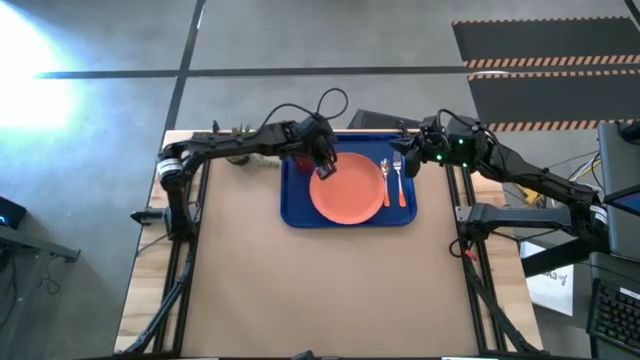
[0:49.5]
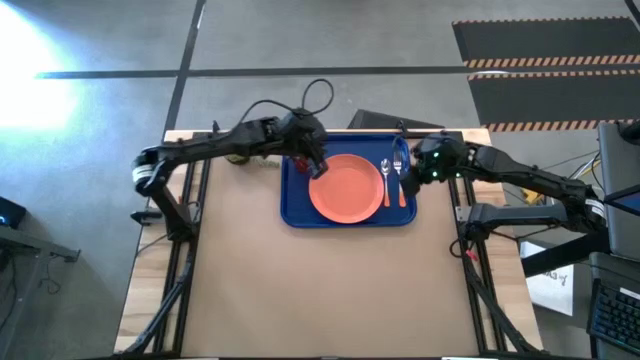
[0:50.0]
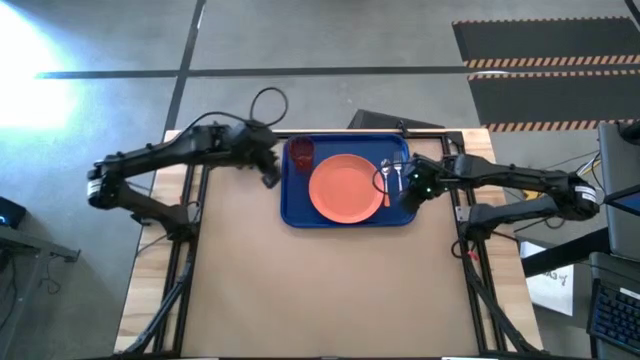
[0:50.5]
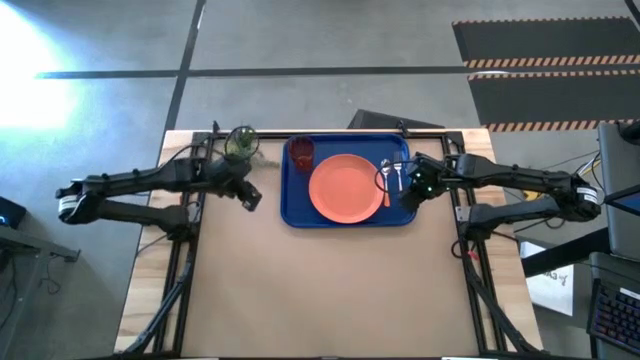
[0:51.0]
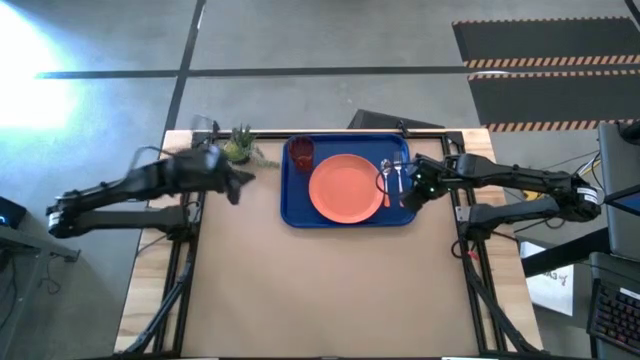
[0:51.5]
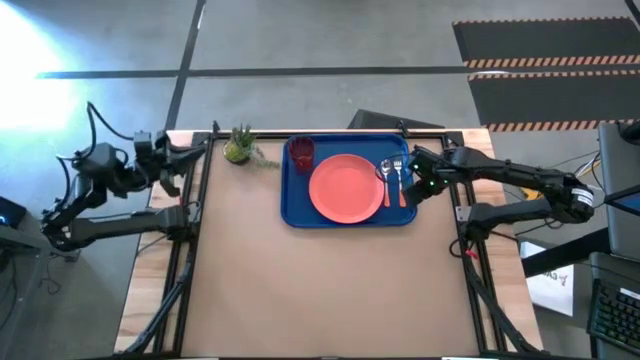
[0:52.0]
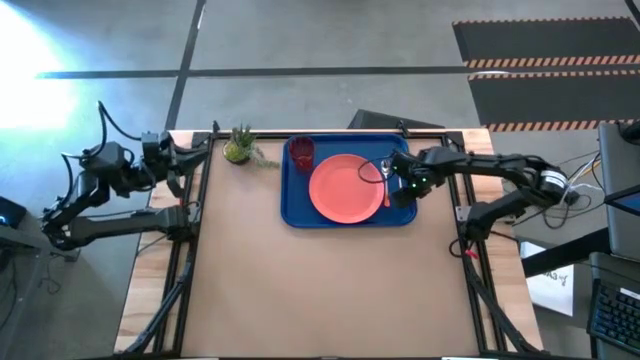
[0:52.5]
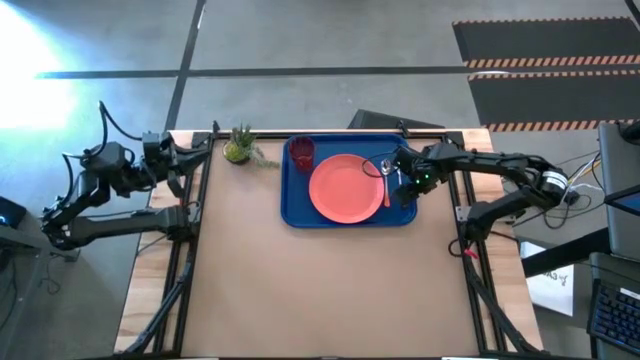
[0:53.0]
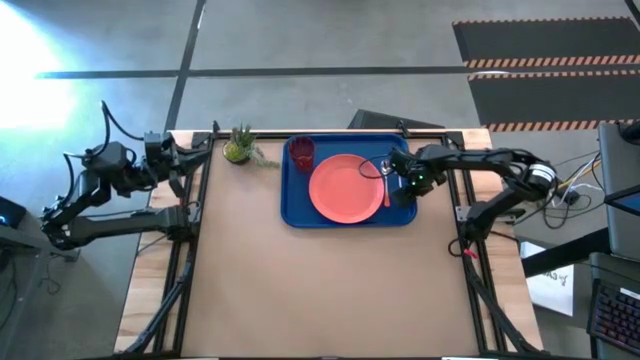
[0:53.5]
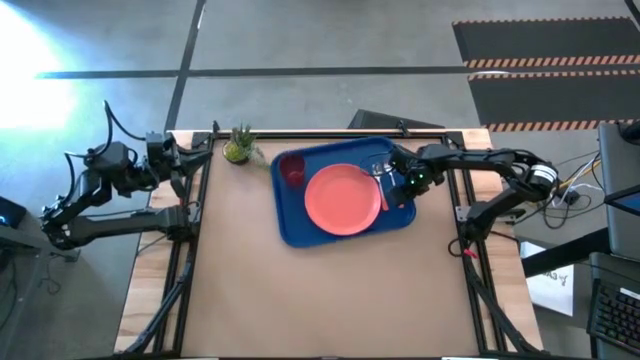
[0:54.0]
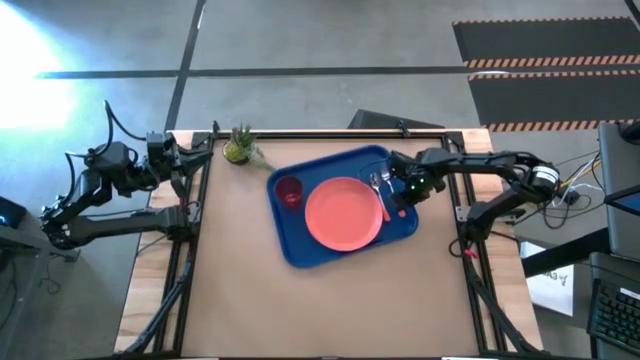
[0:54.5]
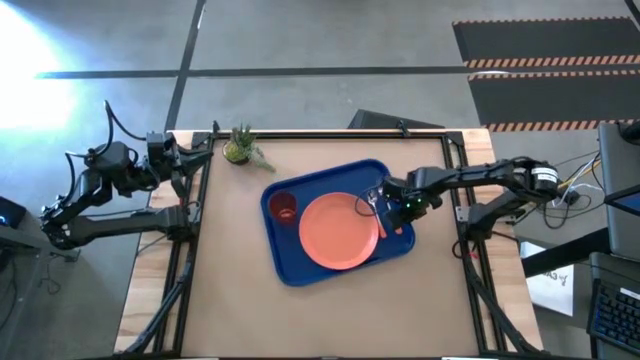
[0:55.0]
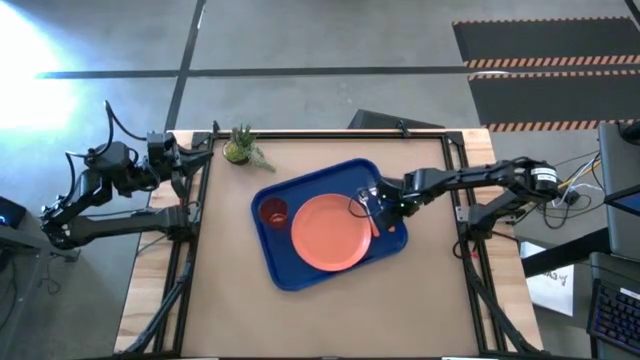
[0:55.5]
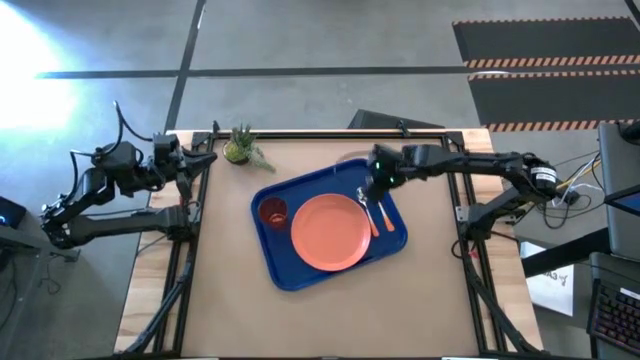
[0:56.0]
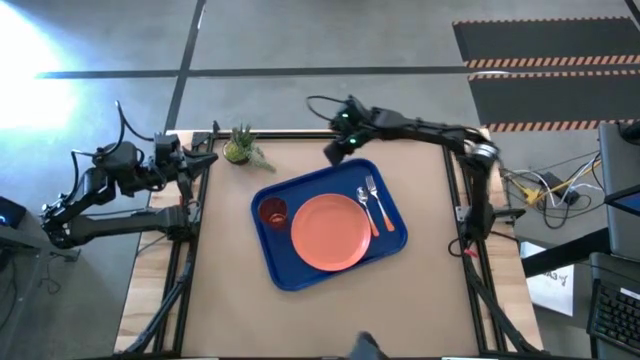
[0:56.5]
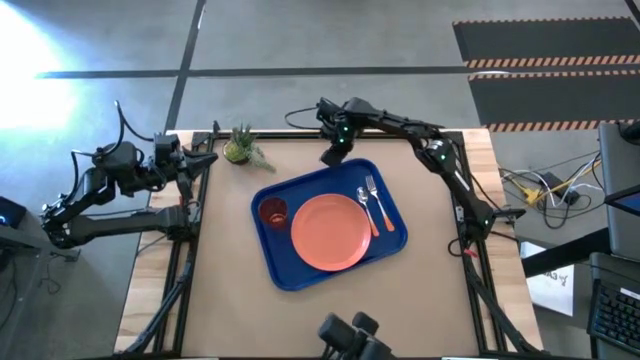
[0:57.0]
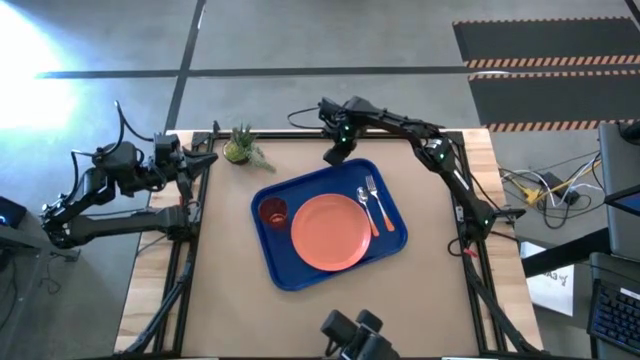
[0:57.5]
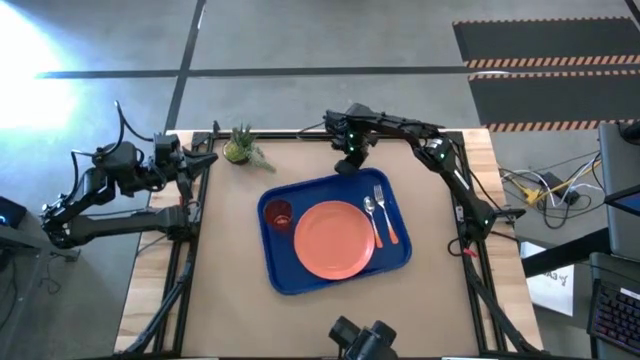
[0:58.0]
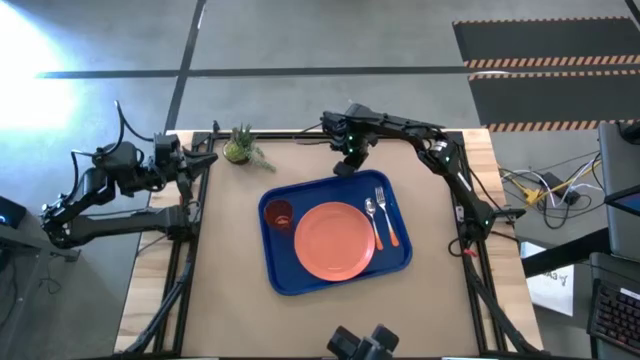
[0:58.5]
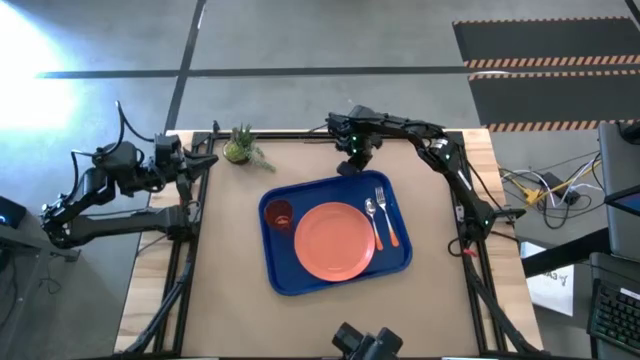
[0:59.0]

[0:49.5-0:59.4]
Task: Pick and place plate/cup/fork/spoon on tray
Move the set serving tray on the center of the table

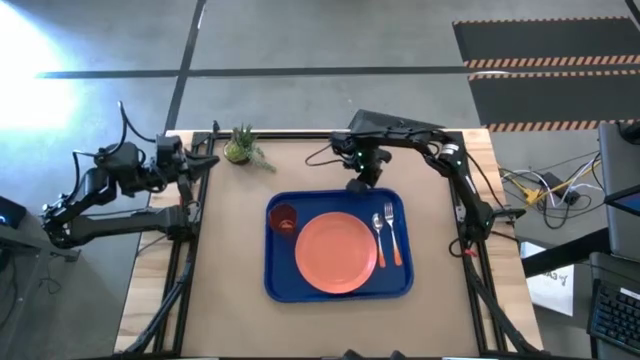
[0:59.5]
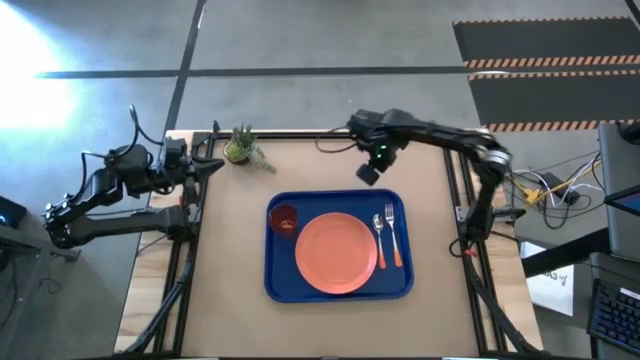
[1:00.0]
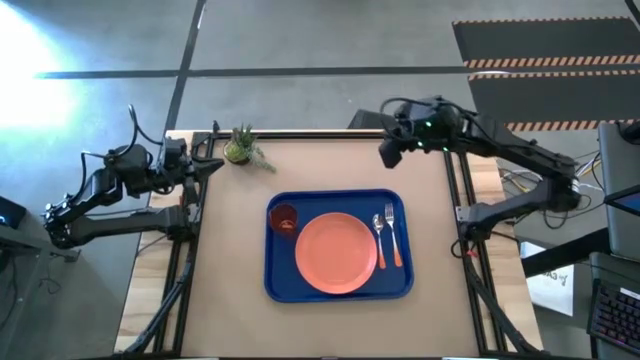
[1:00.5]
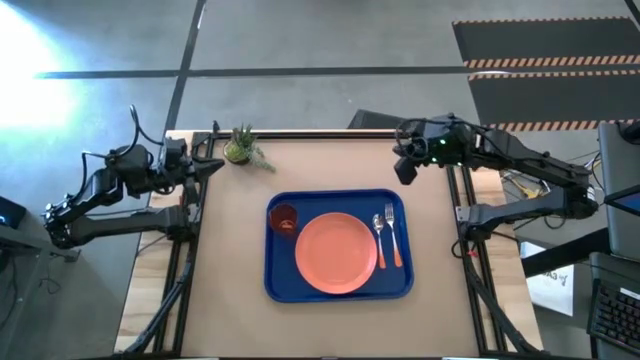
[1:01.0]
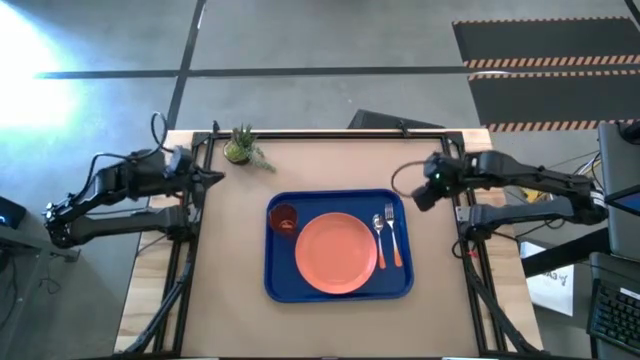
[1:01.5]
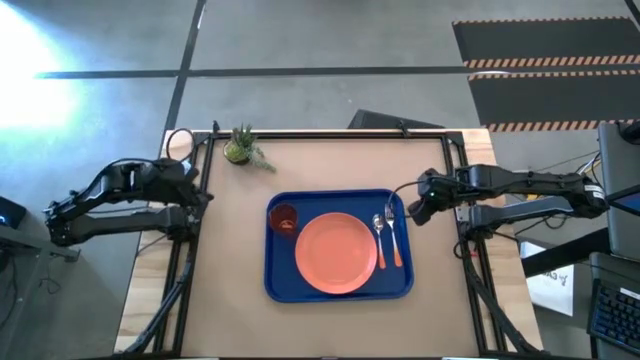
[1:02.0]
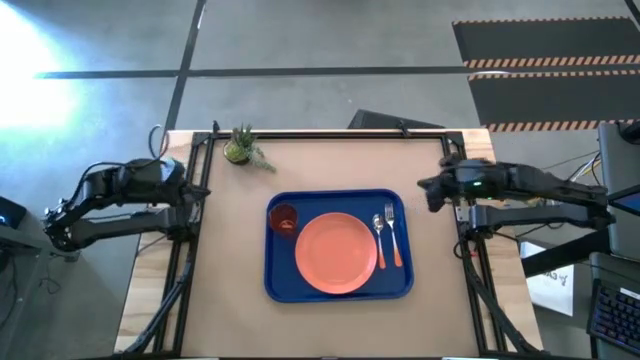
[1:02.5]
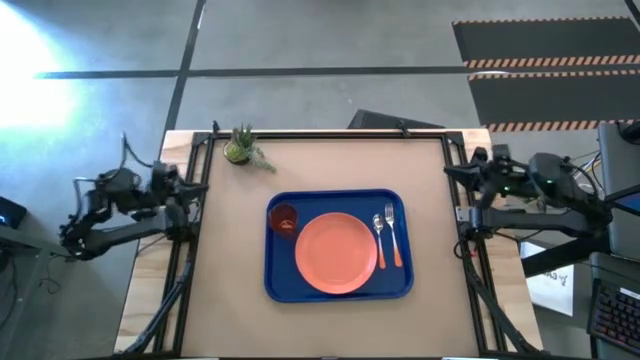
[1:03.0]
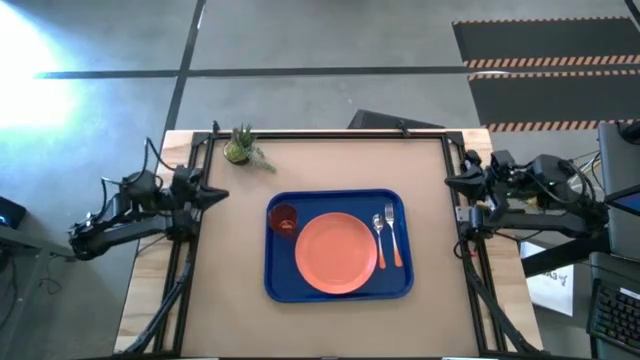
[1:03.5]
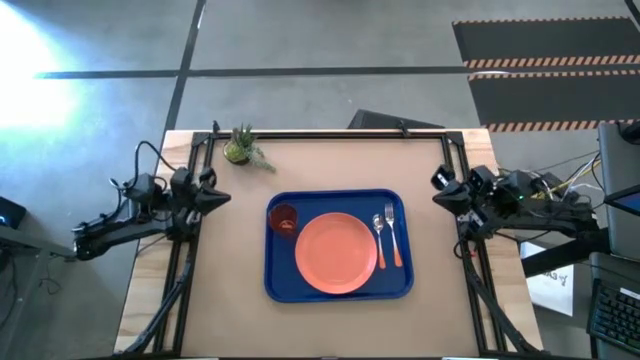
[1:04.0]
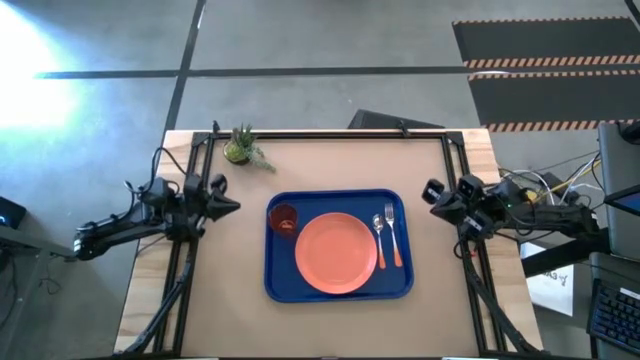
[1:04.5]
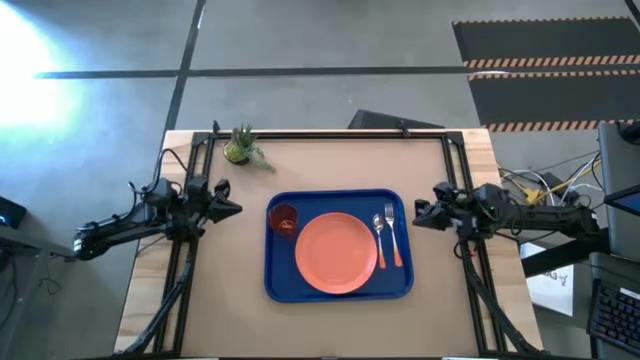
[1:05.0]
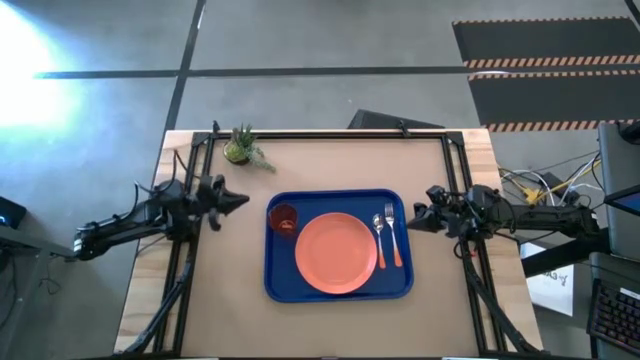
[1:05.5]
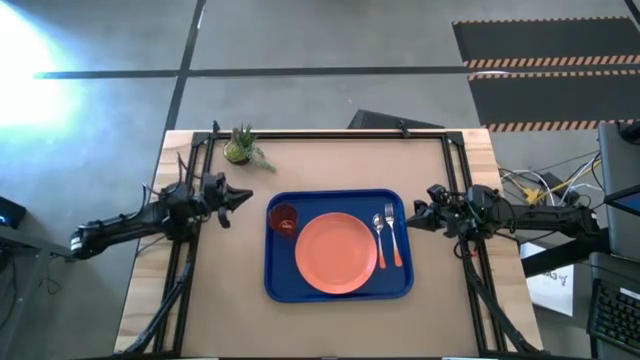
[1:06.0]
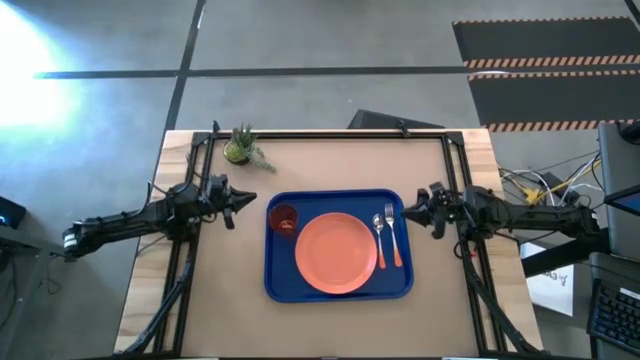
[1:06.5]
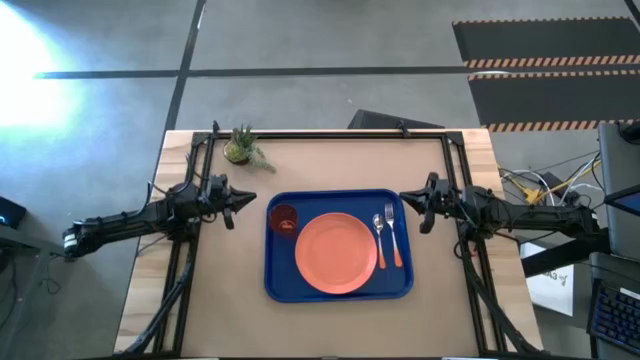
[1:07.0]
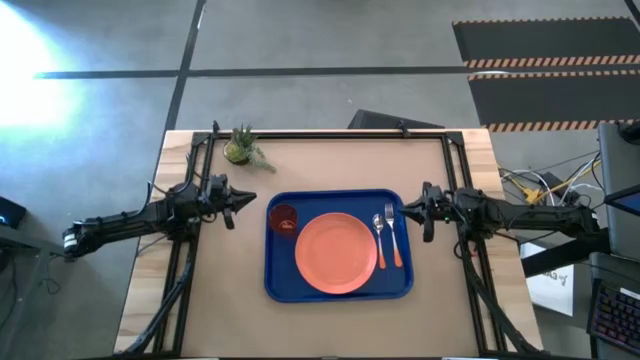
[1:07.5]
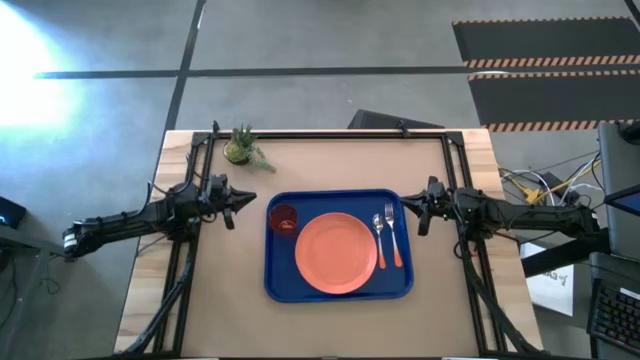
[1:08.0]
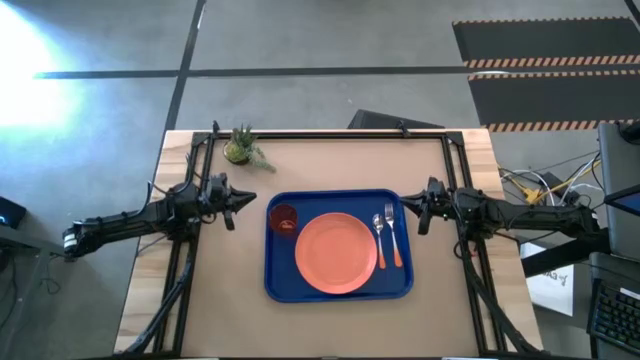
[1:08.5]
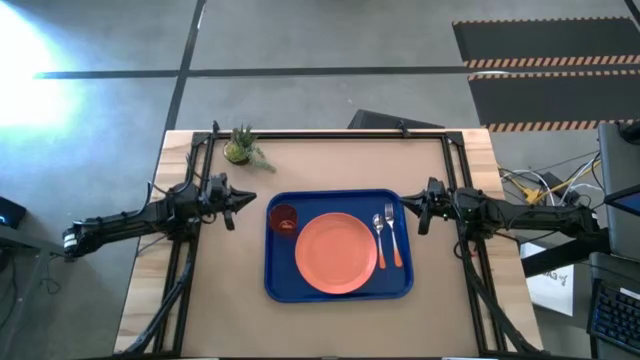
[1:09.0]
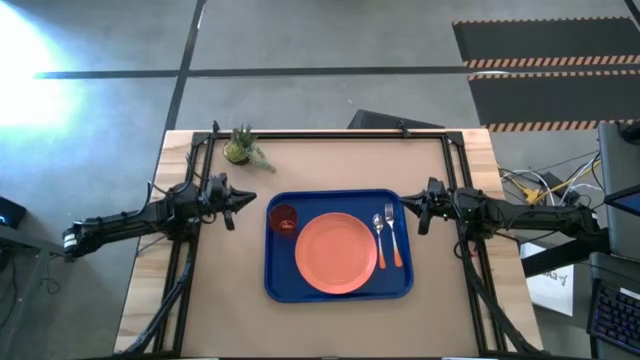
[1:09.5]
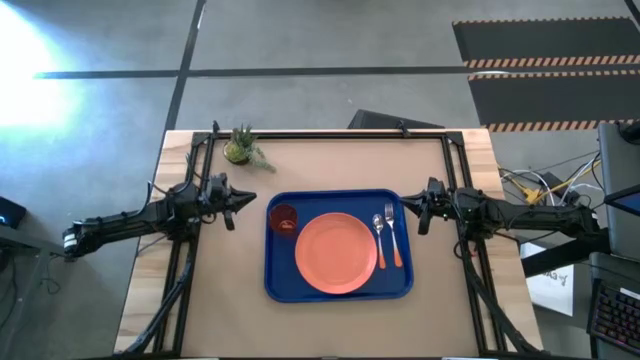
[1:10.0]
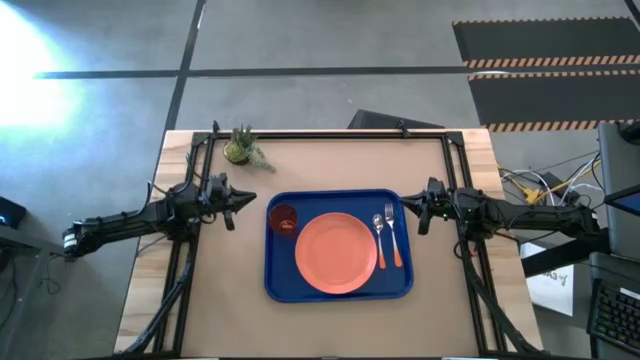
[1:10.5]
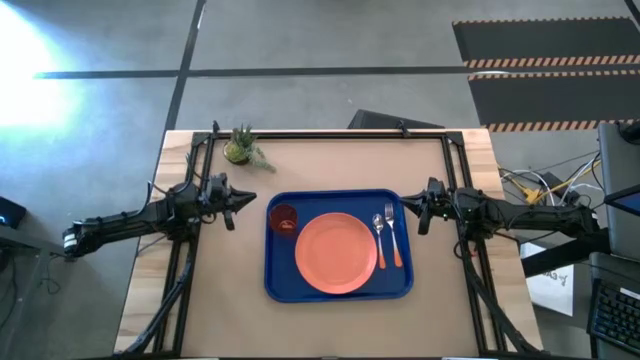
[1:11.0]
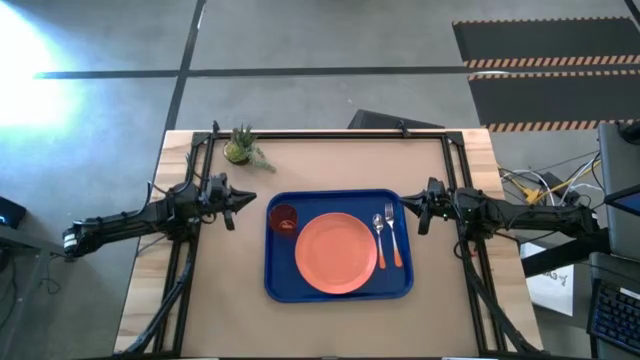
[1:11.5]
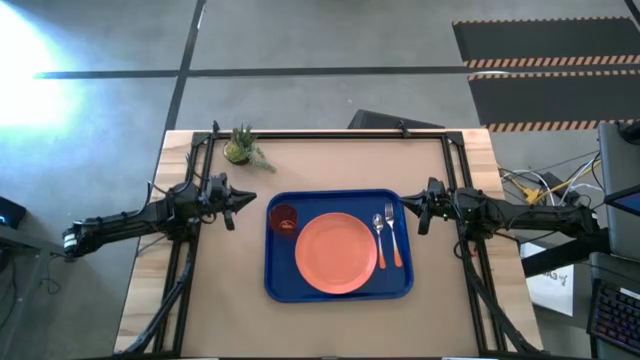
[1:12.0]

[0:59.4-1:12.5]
Return to Home Position
